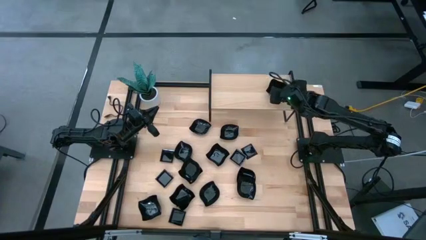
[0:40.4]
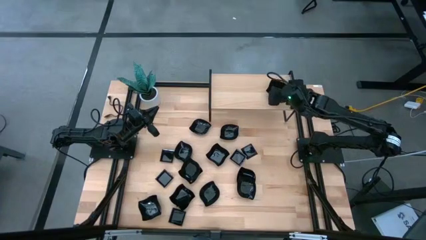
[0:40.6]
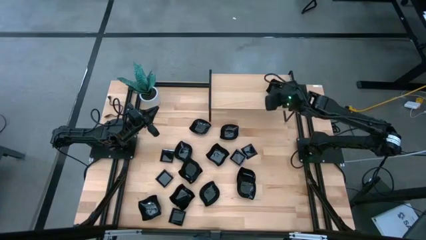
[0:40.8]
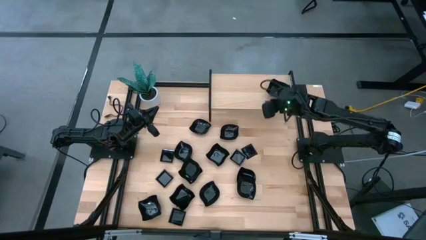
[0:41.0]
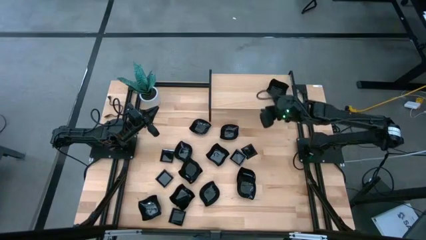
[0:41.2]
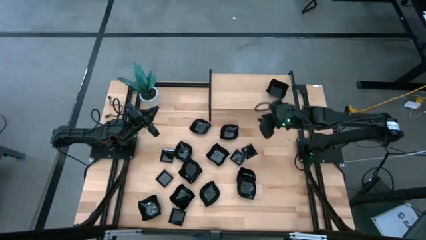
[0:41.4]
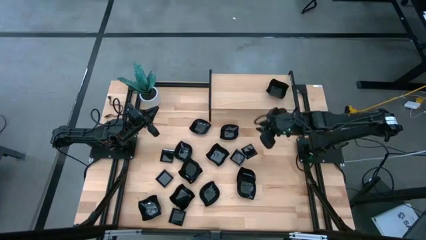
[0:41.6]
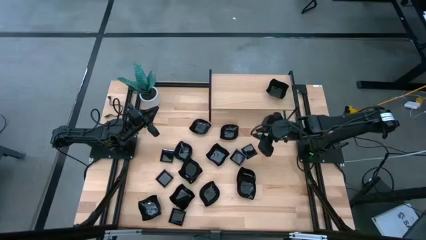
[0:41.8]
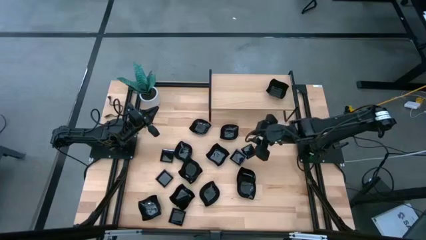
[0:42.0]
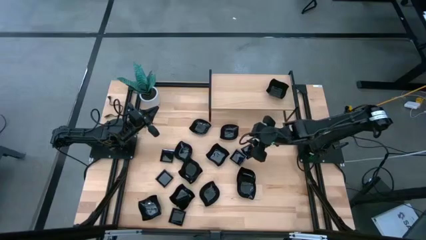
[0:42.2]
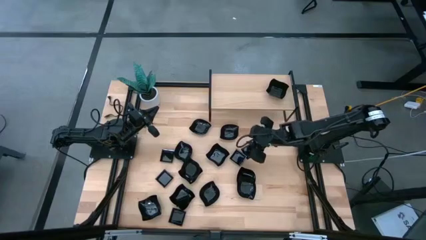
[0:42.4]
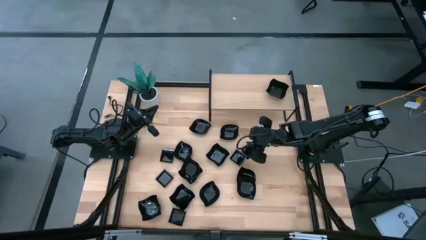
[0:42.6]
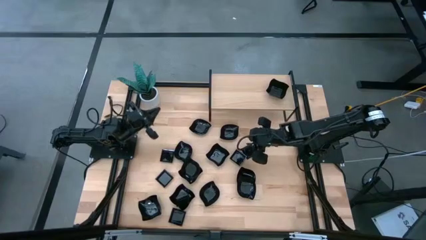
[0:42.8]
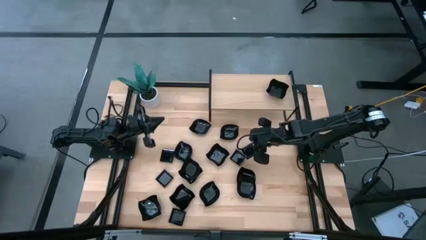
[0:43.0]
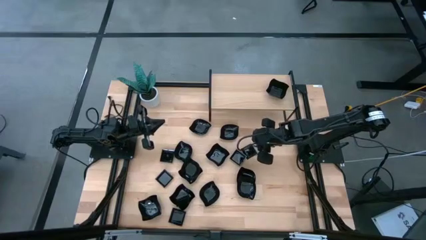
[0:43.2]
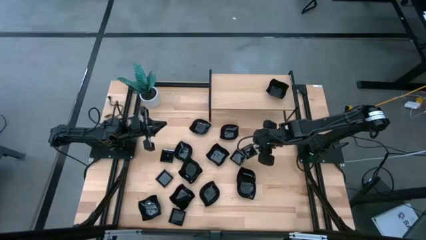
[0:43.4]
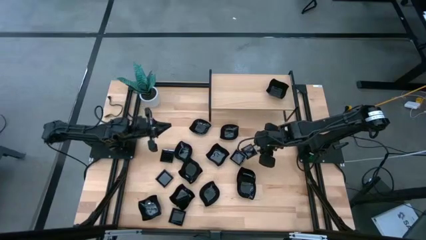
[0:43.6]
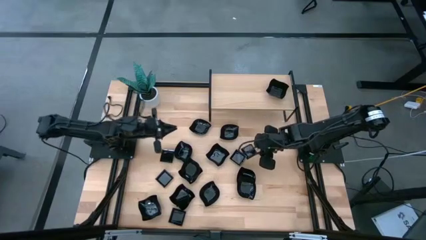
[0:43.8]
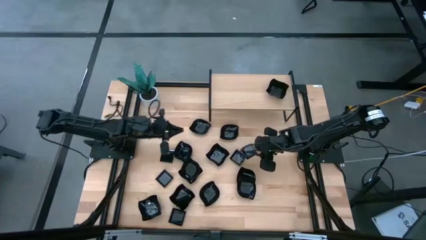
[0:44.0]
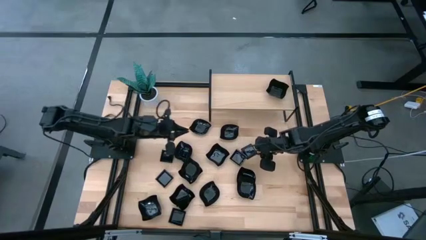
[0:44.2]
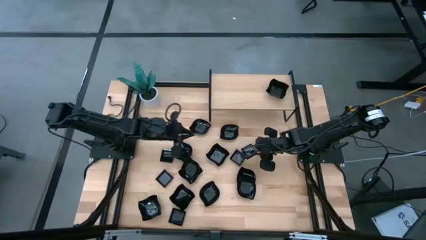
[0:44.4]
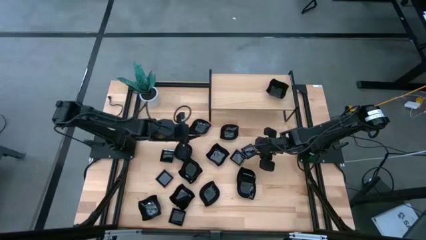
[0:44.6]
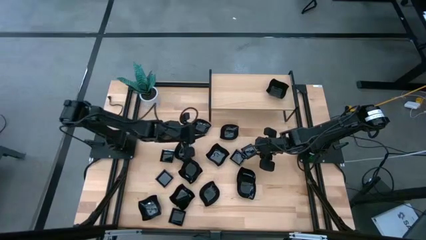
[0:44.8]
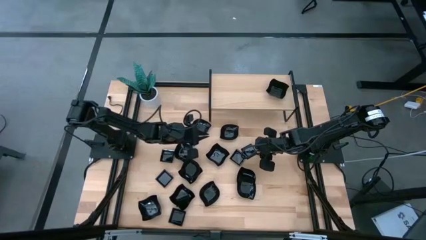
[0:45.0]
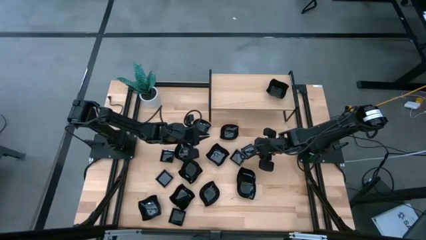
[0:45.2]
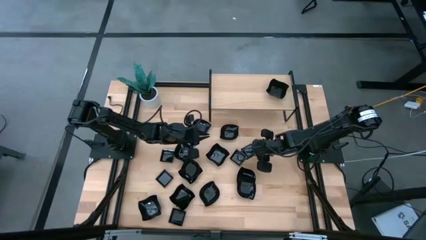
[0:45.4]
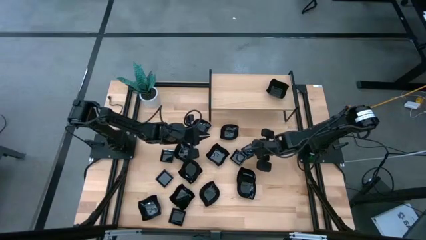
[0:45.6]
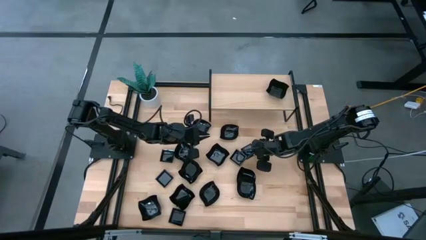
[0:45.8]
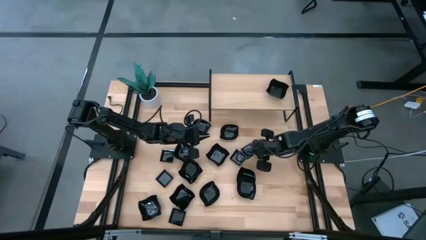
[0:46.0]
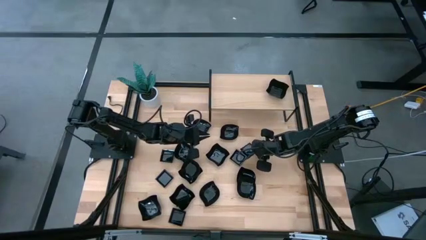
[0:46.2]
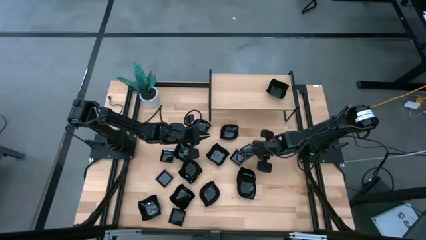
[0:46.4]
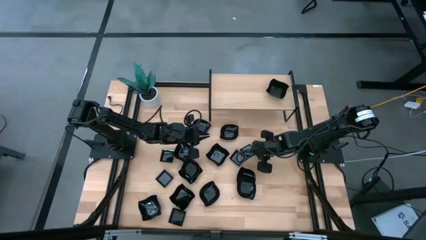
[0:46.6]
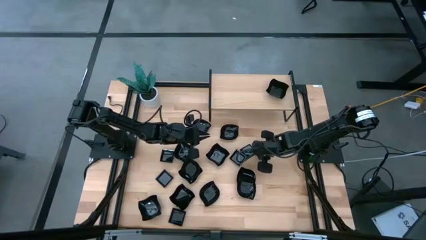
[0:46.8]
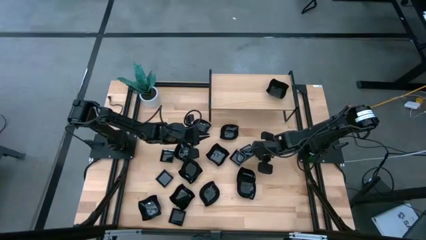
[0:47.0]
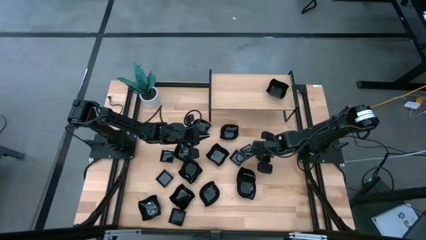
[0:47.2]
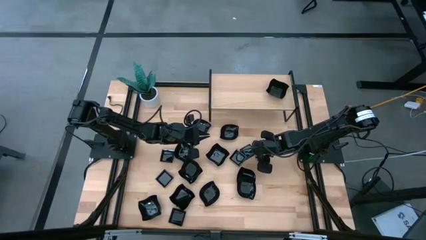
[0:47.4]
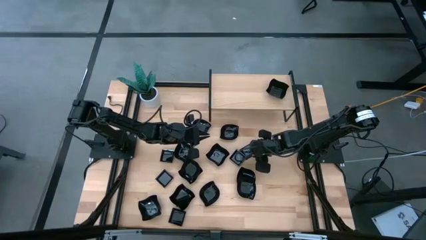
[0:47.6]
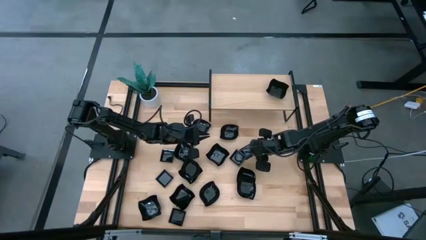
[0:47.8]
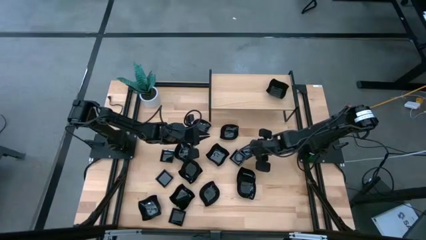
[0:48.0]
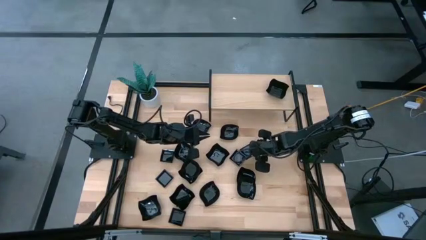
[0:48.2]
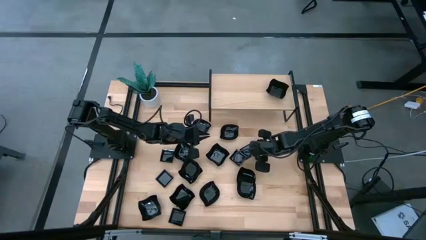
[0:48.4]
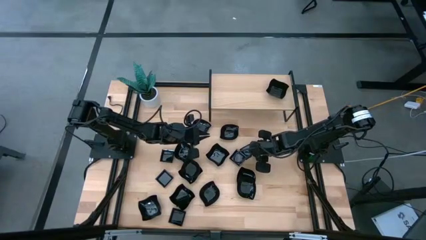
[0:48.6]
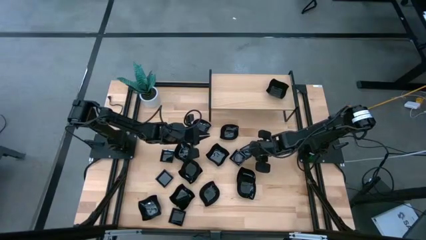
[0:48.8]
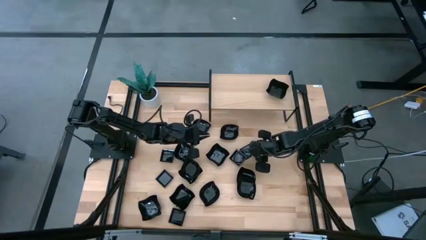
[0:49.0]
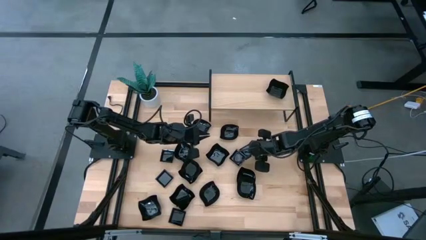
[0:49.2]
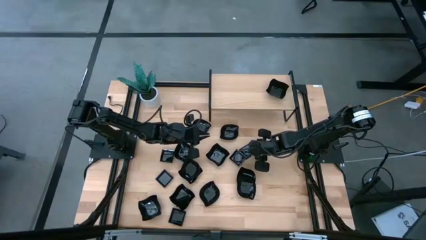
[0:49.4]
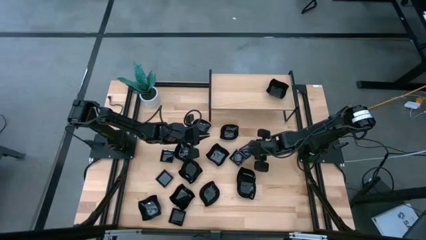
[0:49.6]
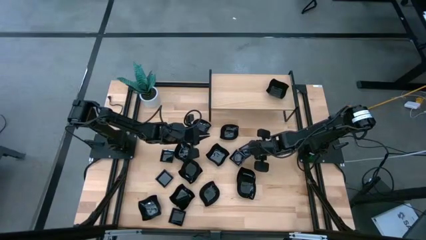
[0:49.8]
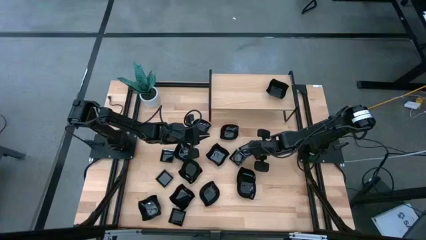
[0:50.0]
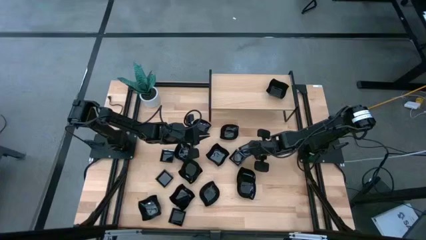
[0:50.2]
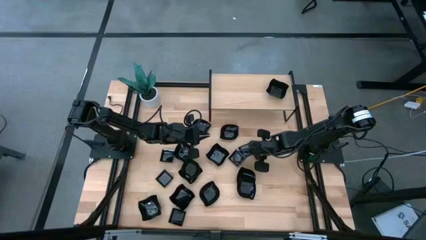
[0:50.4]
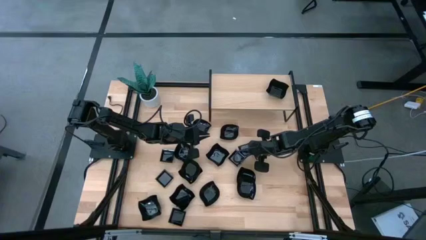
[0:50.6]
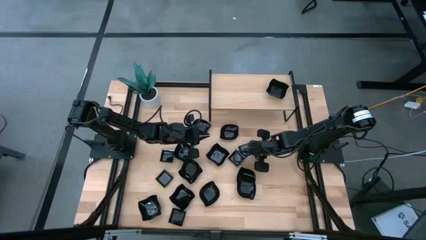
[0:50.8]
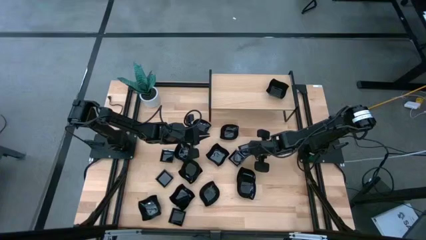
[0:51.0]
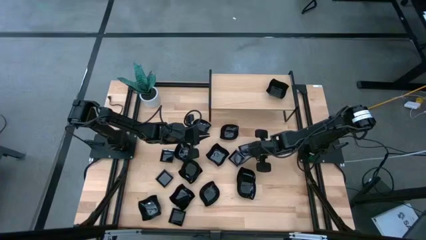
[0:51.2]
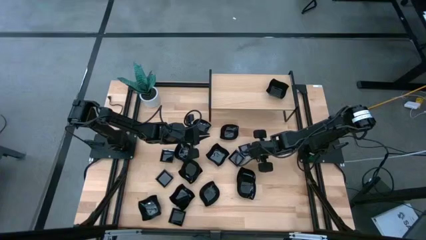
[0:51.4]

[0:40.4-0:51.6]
Task: Pick & Place Mini shaped plates
Put the black square plate on the shelf

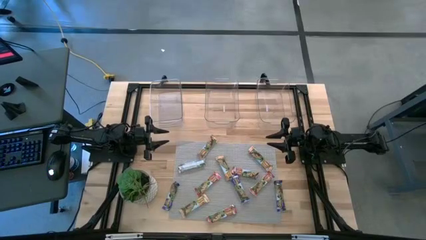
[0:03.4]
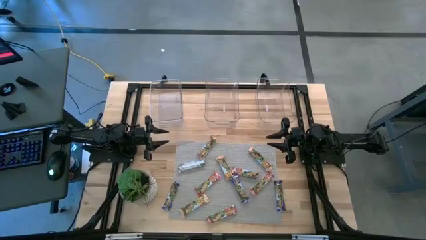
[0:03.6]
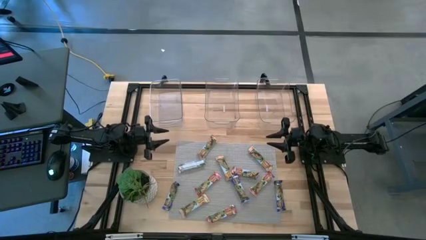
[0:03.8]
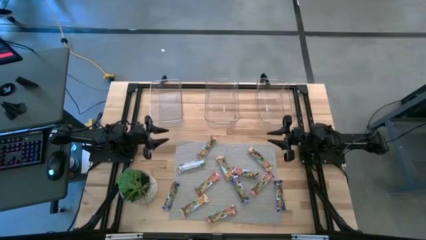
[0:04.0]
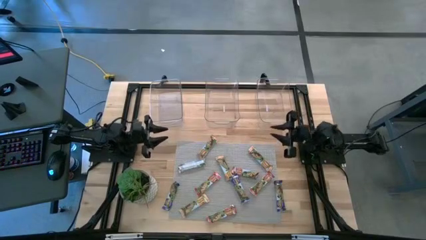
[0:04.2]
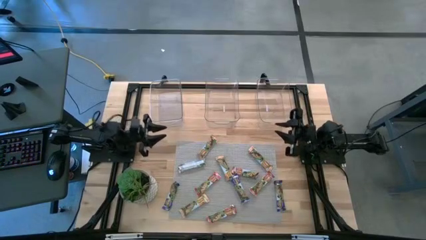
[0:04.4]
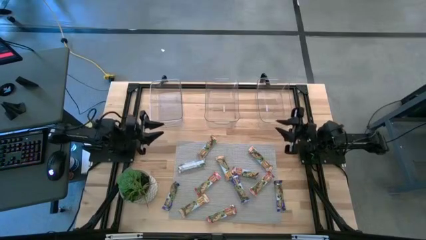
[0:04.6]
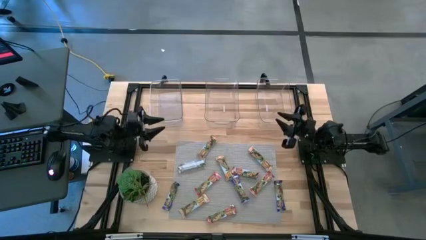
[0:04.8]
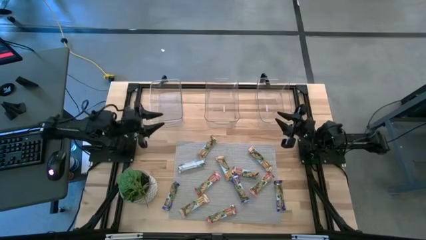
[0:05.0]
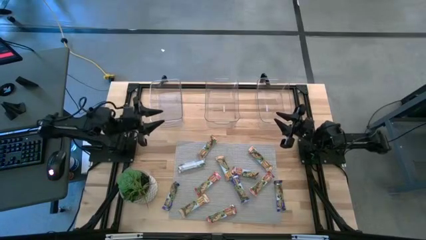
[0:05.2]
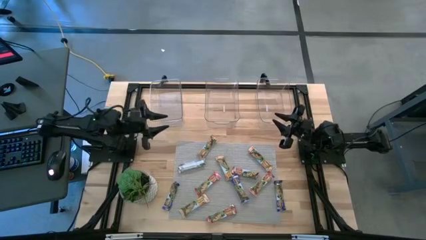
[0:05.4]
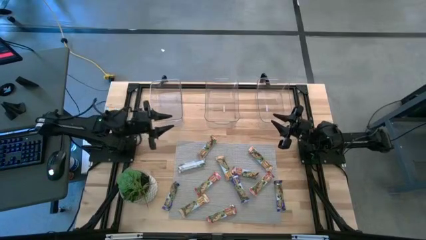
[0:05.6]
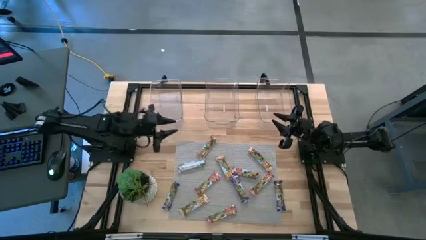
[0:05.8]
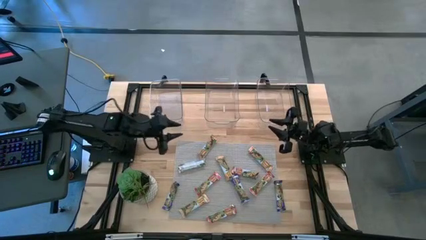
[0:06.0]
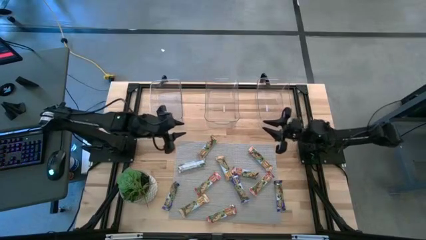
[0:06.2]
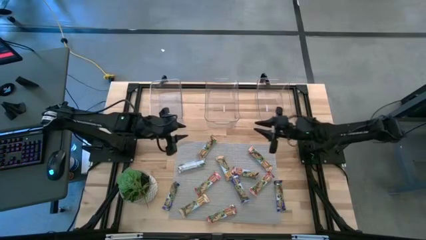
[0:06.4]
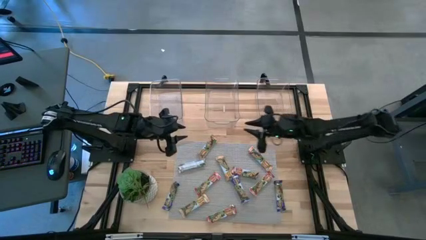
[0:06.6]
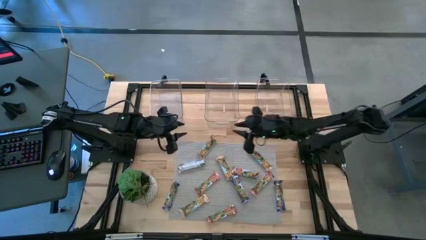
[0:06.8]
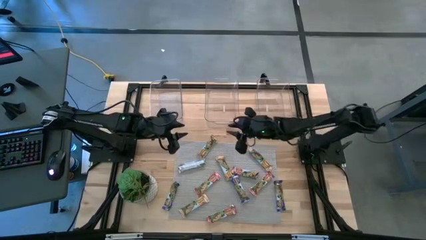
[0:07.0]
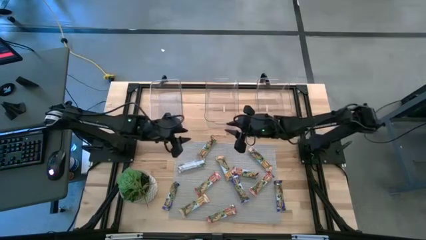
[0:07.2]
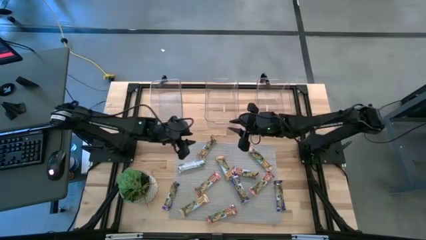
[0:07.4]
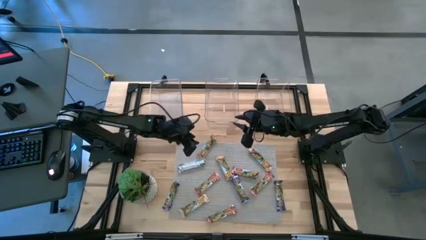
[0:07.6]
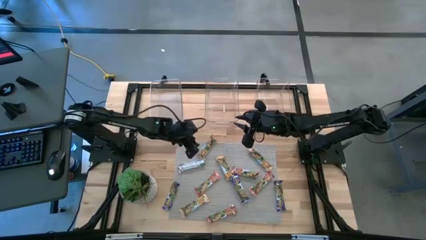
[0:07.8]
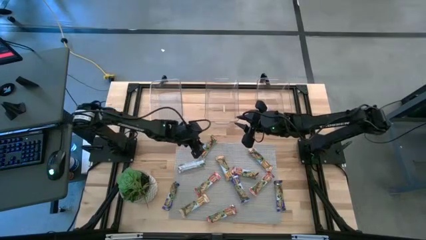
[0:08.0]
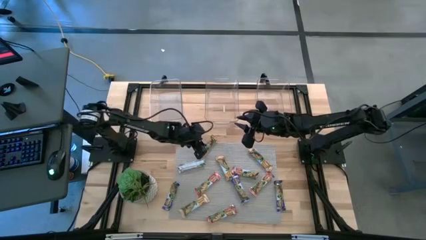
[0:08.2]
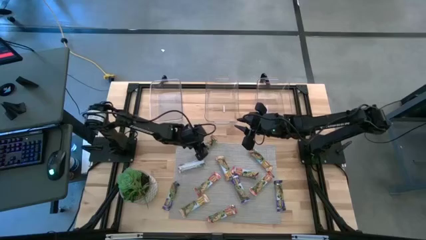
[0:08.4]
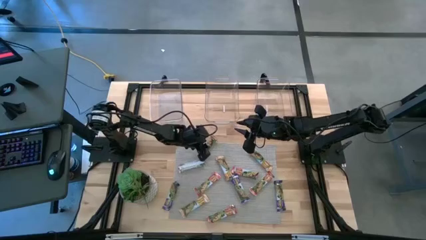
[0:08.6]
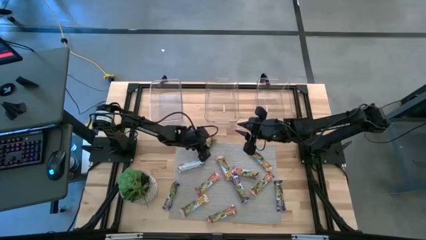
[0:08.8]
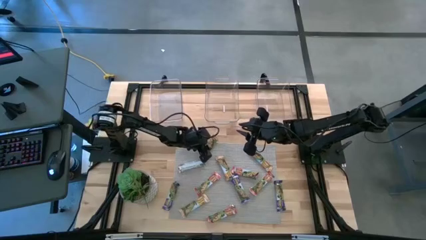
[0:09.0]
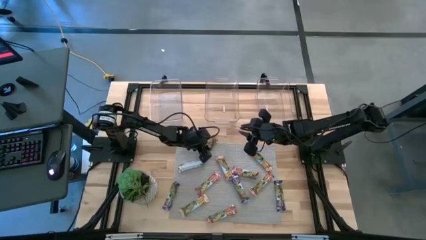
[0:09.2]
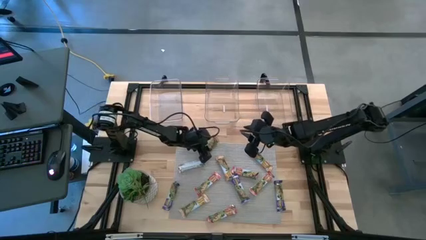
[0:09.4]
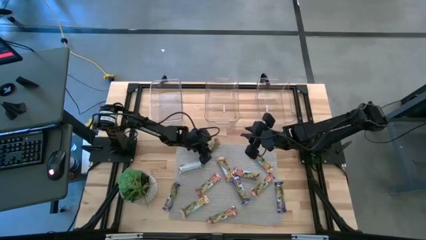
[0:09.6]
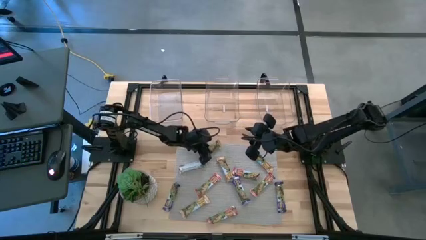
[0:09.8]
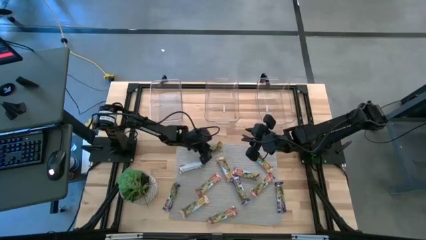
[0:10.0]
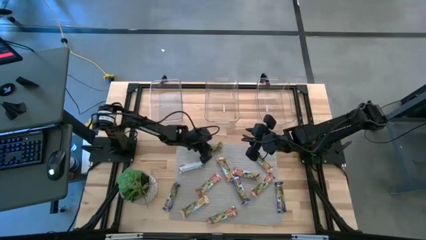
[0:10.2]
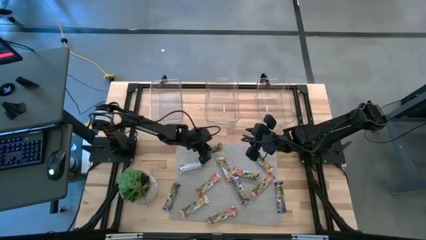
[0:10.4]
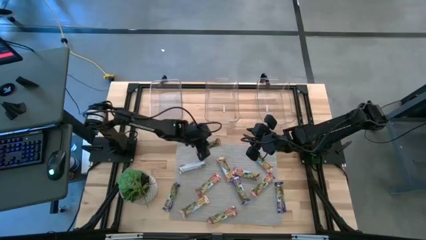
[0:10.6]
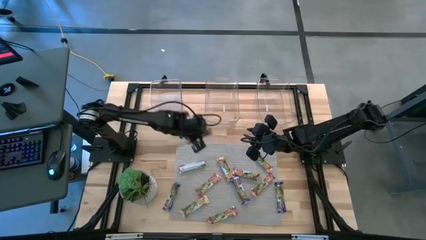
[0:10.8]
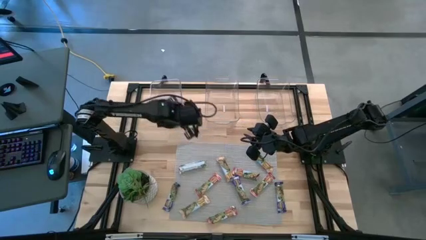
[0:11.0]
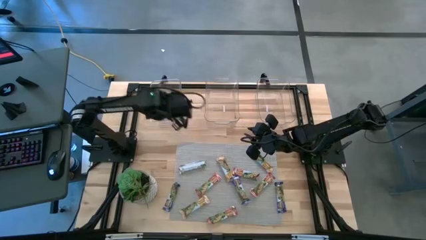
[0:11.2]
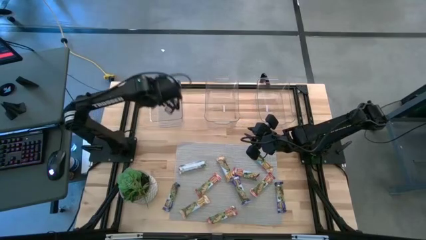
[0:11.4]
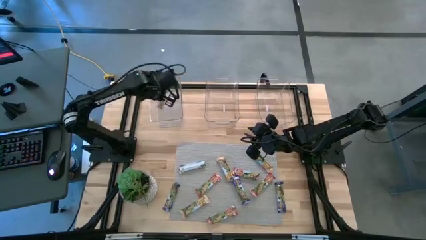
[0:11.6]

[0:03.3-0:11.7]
Task: Pick and place Granola Bars by type
Put the yellow granola bar into the left transparent bin
